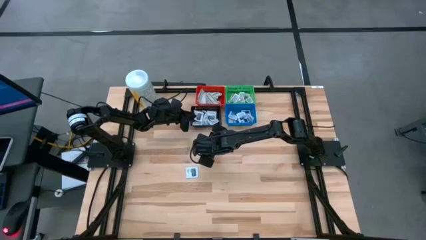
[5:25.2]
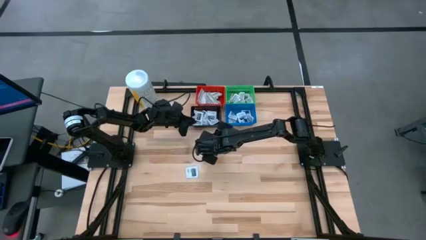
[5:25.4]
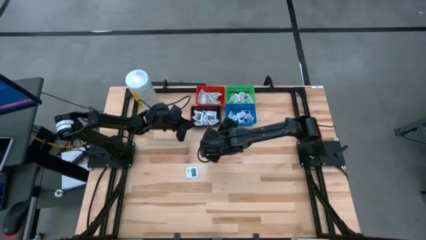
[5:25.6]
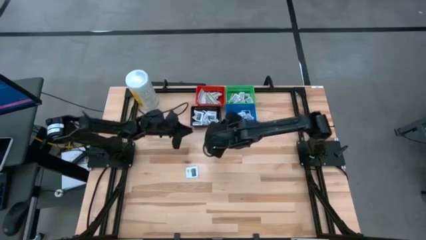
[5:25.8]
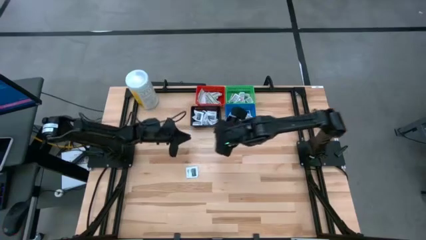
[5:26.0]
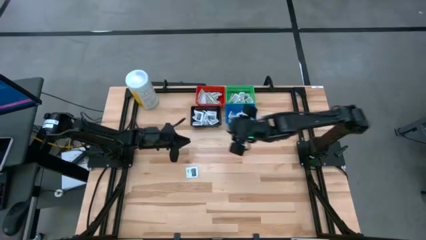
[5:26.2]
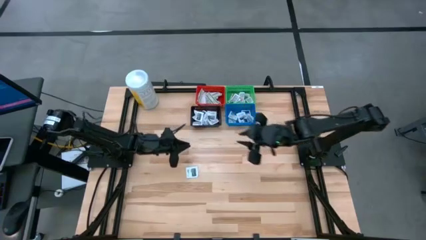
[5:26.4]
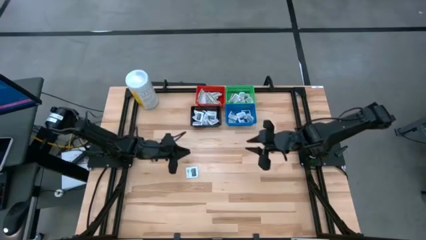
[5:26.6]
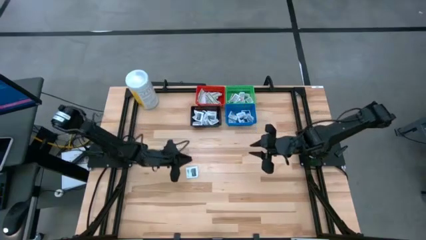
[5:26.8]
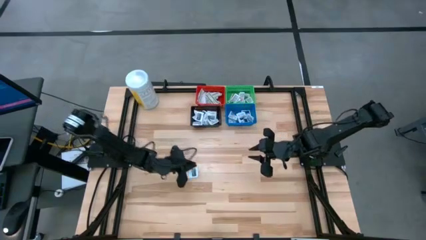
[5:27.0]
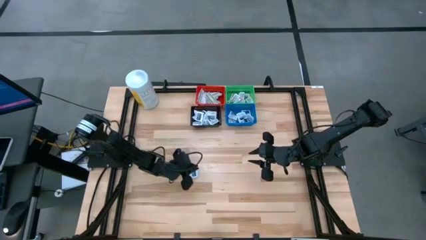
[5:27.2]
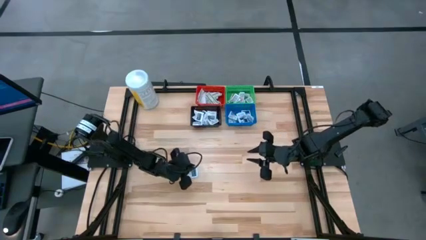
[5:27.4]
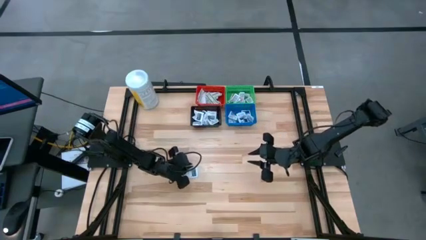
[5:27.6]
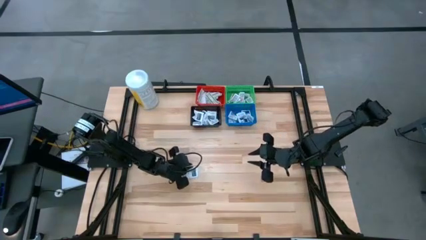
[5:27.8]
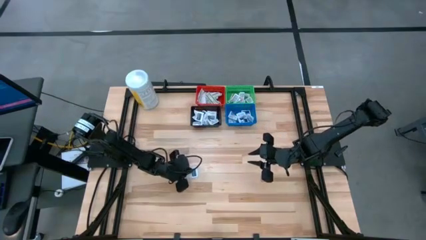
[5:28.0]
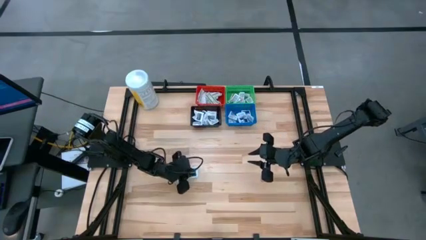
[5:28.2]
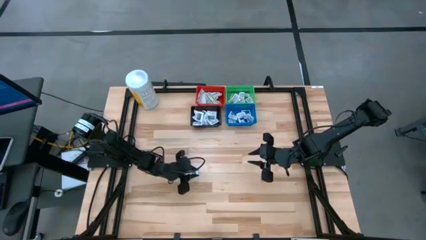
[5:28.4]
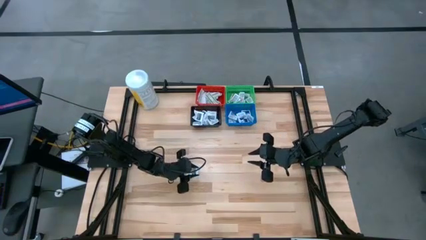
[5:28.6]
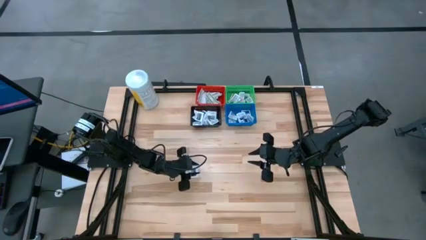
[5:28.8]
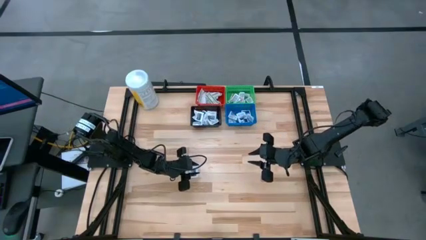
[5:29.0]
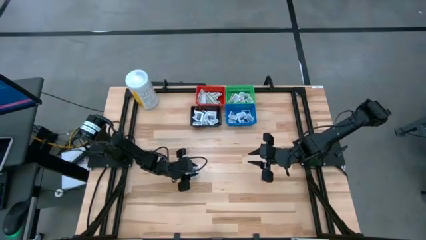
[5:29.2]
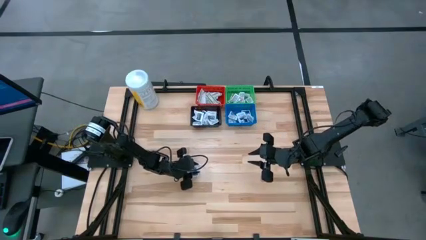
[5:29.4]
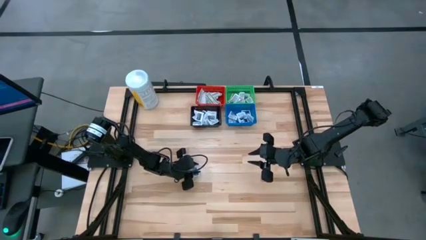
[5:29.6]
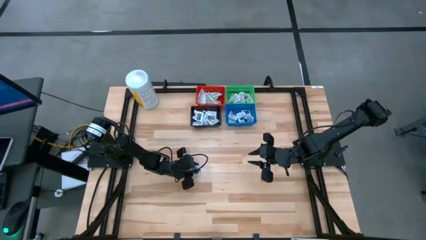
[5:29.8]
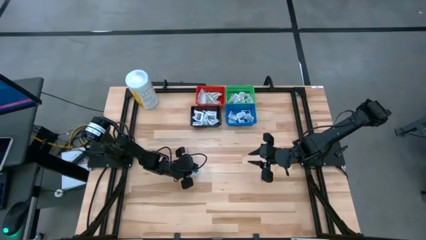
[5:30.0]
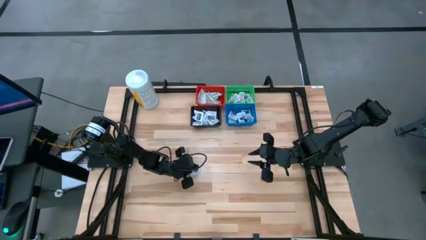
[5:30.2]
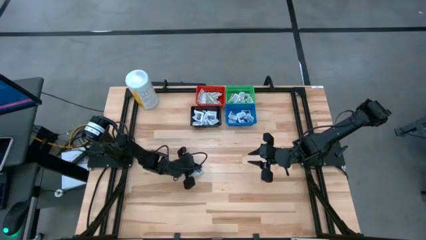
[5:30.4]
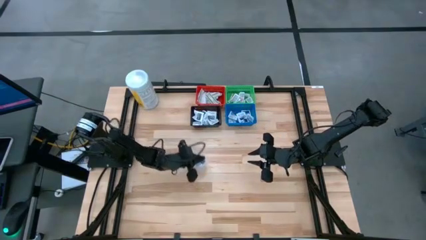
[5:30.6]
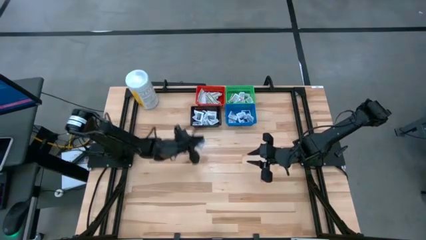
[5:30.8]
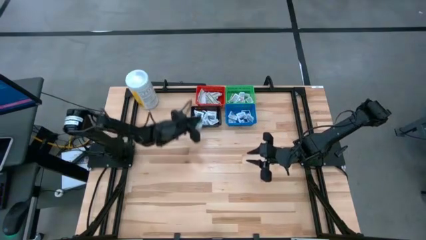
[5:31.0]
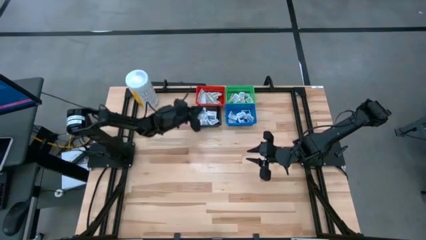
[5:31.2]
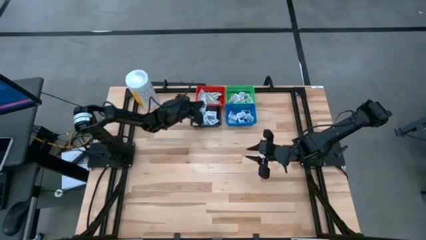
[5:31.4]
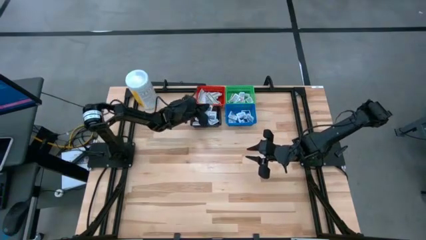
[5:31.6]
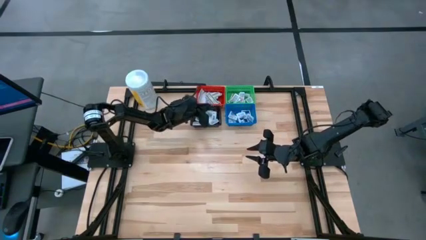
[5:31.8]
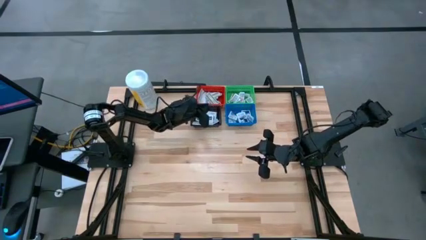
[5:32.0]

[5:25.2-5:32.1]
Task: Pick & Place First Aid Supplies
Put the towelette pack into the black basket

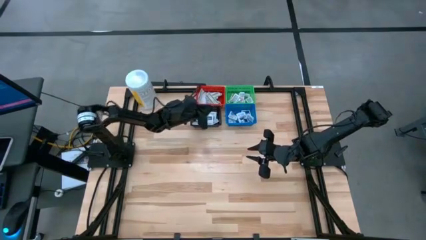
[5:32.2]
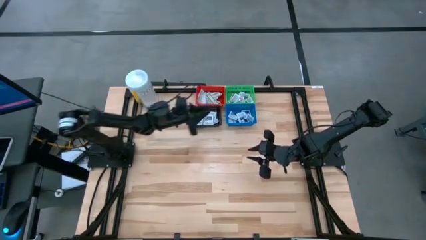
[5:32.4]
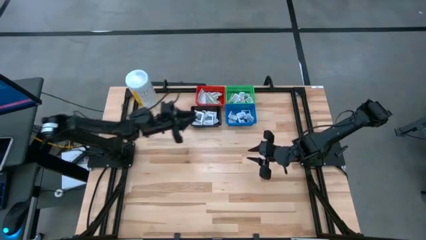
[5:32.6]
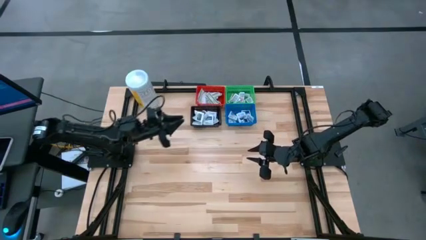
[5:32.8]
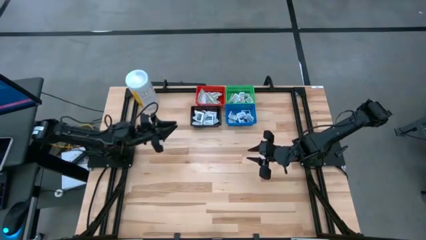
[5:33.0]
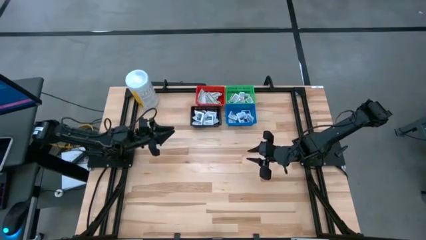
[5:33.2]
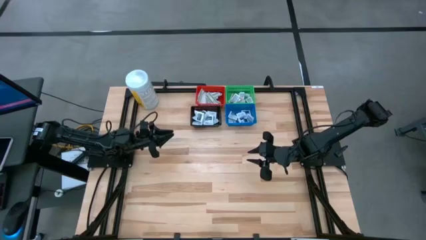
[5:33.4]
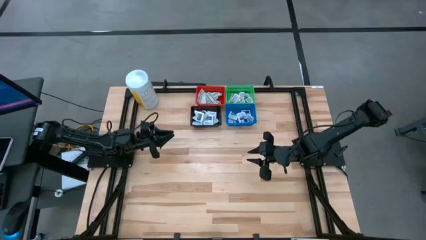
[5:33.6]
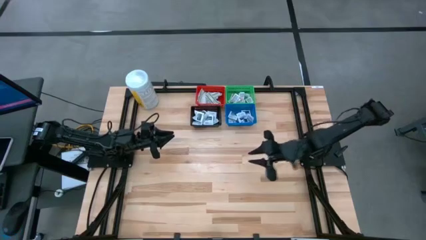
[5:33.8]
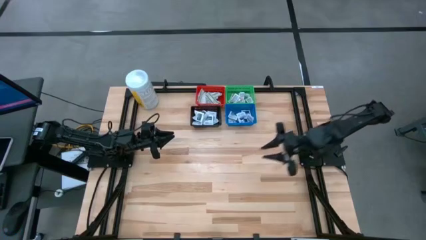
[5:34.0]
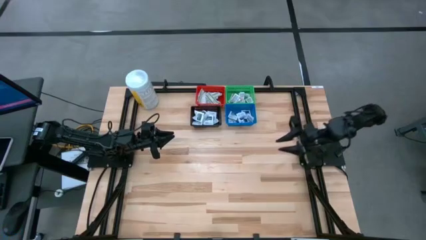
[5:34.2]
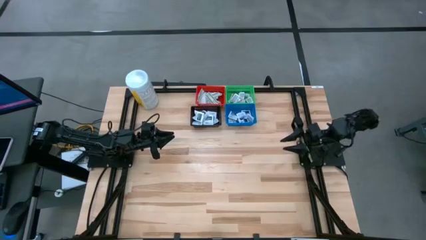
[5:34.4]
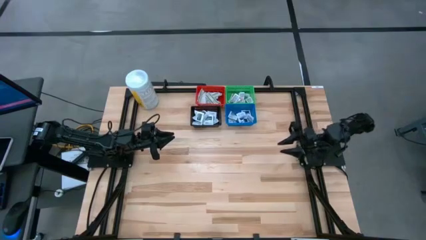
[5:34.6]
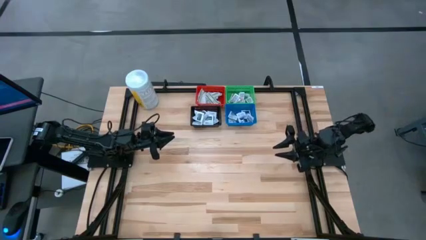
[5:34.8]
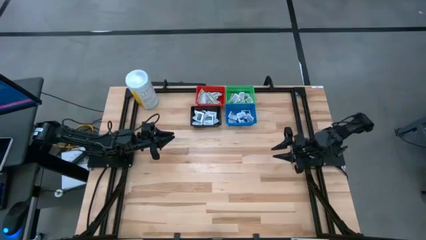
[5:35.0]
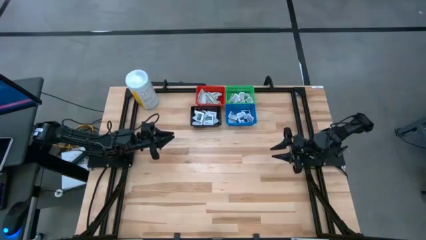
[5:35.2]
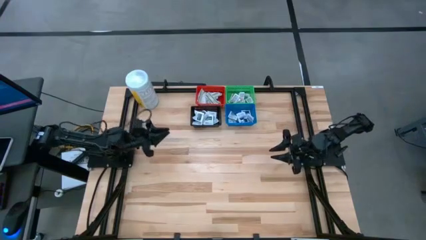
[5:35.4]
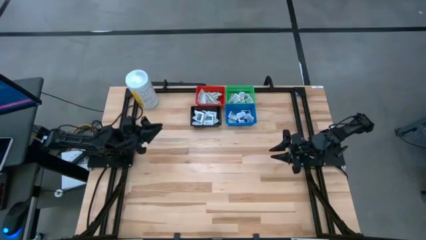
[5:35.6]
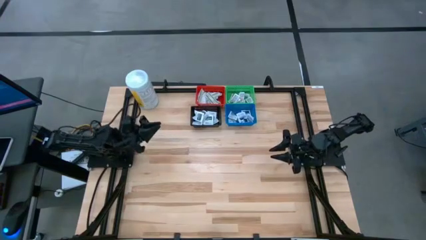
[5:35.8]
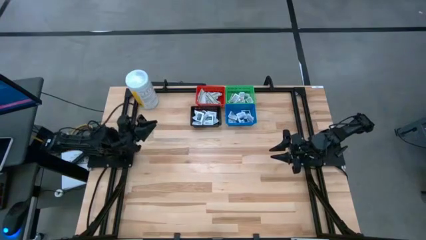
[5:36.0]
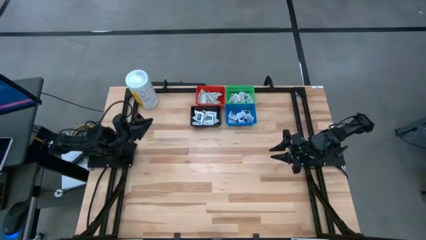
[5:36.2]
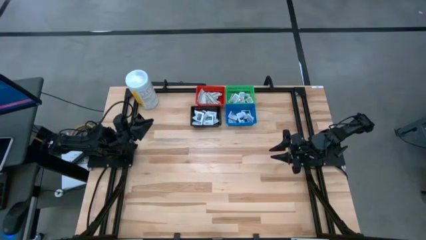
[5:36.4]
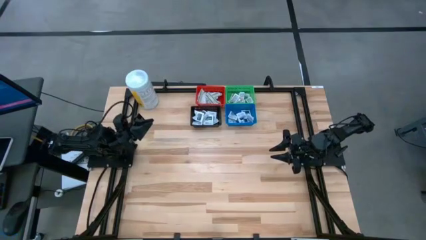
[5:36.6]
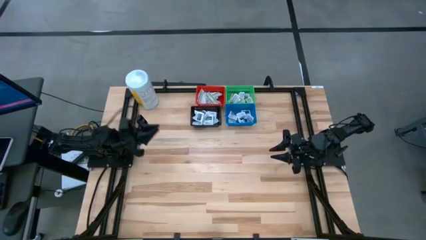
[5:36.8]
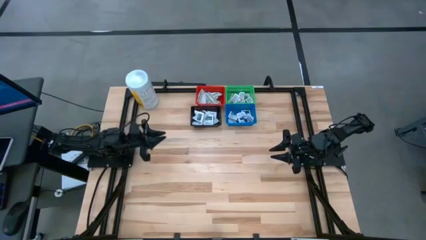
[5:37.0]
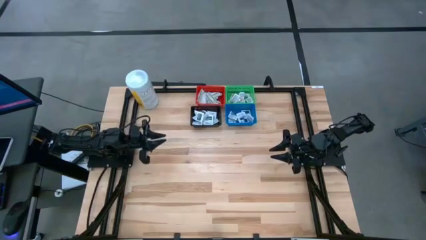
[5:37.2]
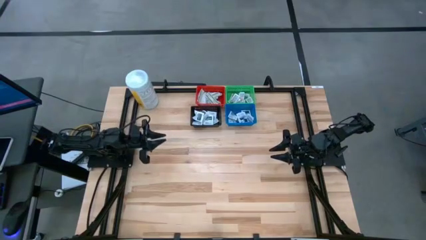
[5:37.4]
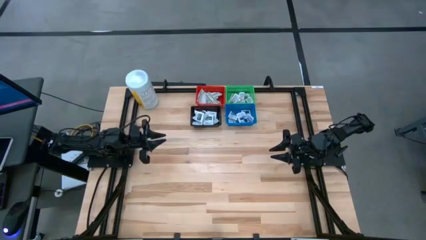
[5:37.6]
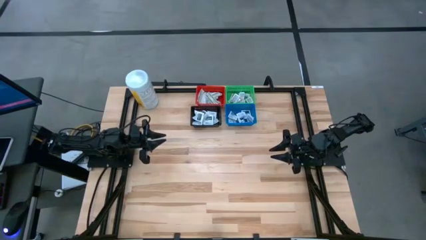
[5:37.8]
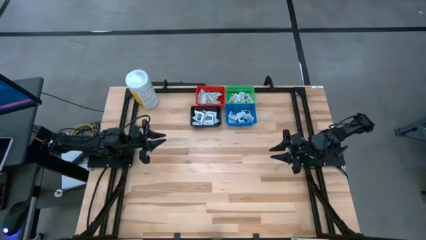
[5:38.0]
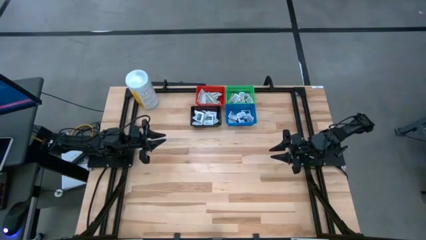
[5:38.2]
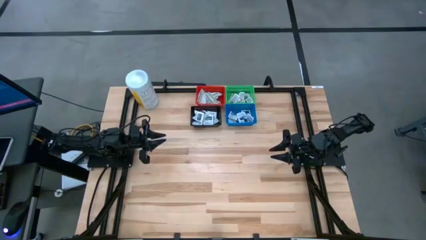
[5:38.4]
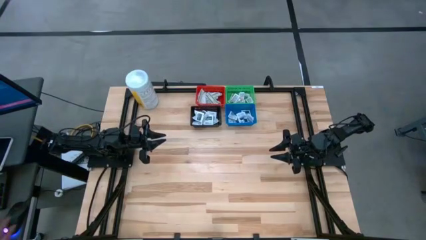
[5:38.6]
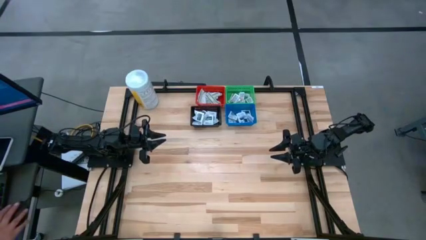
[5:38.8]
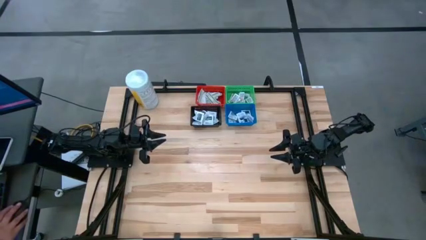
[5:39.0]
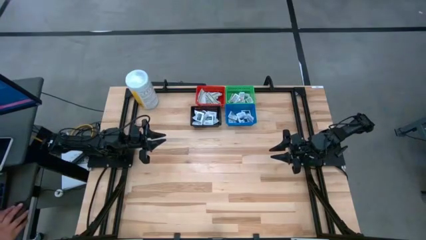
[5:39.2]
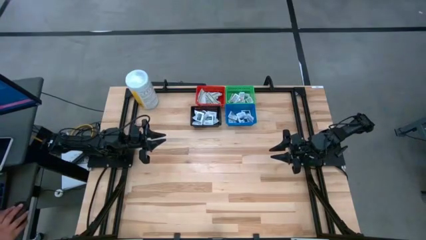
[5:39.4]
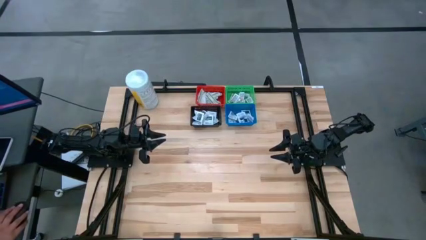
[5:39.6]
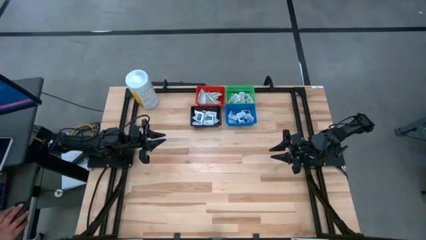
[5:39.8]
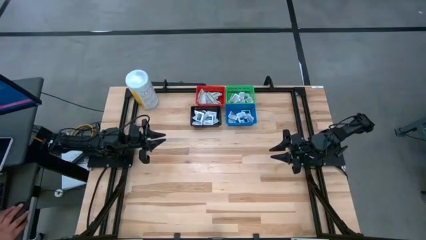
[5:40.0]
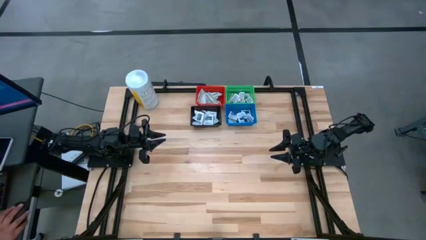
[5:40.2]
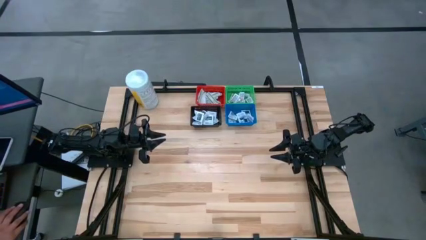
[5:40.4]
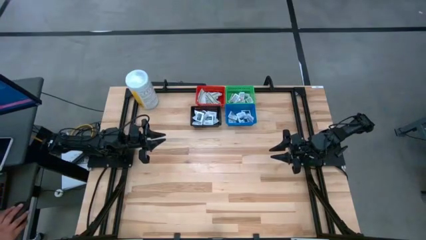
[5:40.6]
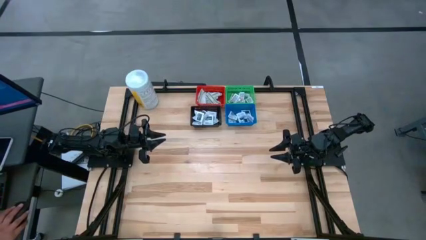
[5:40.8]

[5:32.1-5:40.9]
Return to Home Position
